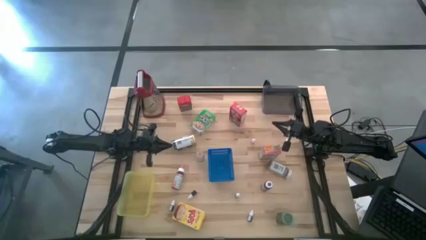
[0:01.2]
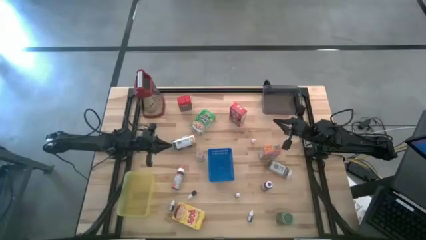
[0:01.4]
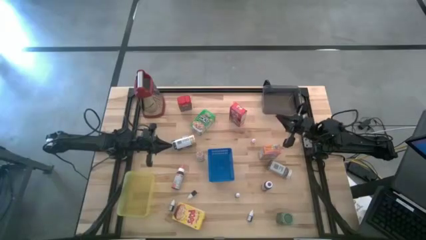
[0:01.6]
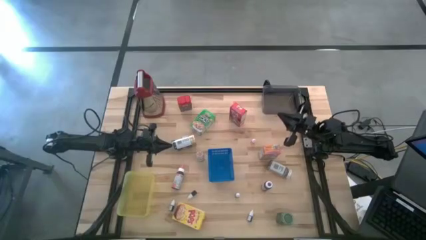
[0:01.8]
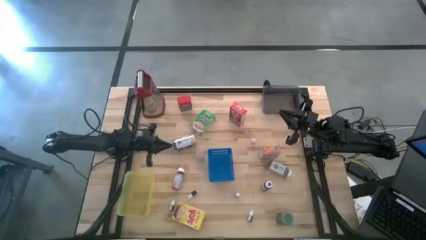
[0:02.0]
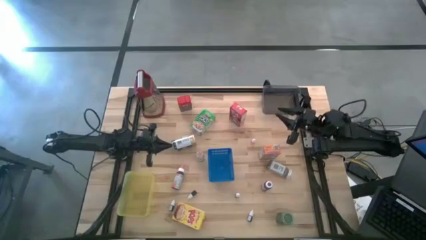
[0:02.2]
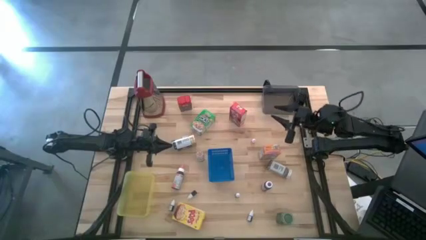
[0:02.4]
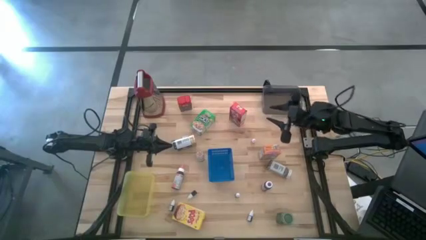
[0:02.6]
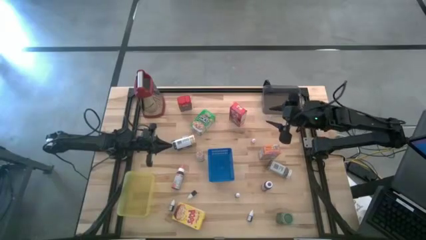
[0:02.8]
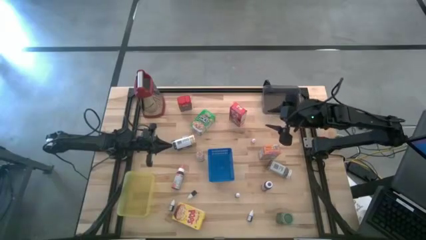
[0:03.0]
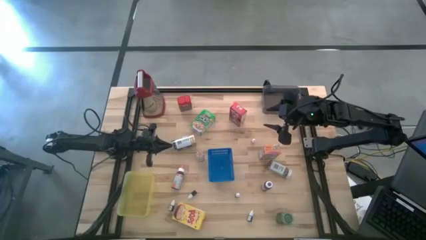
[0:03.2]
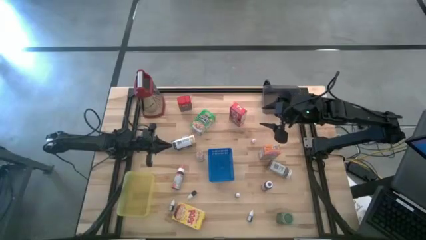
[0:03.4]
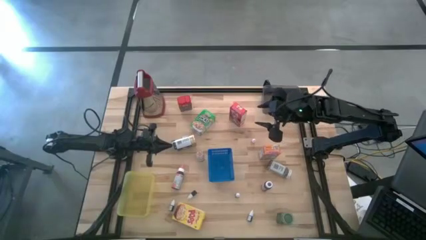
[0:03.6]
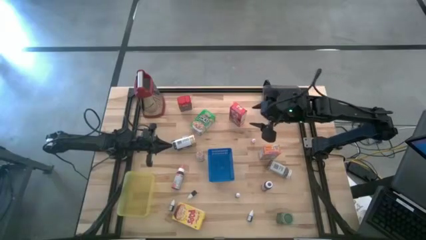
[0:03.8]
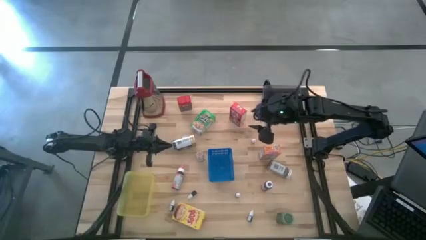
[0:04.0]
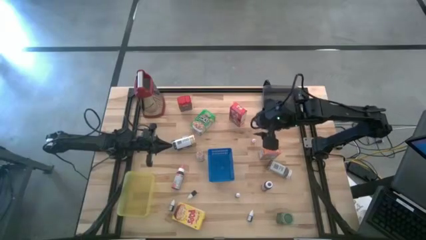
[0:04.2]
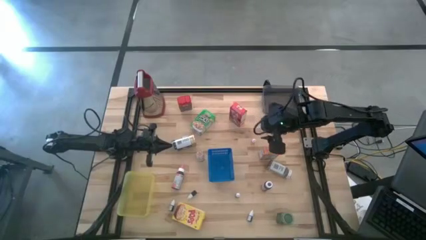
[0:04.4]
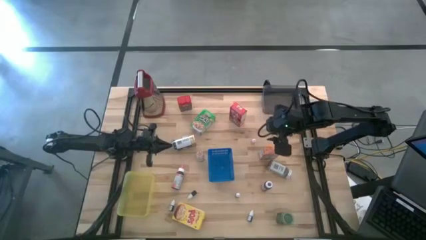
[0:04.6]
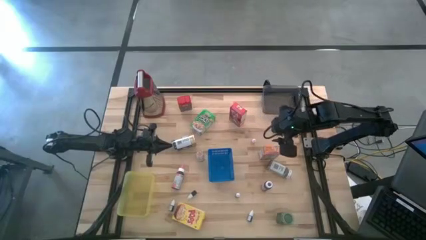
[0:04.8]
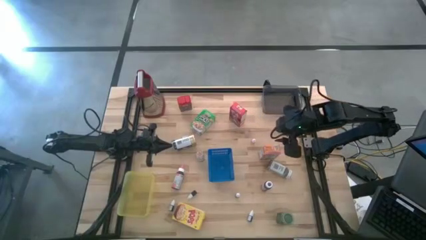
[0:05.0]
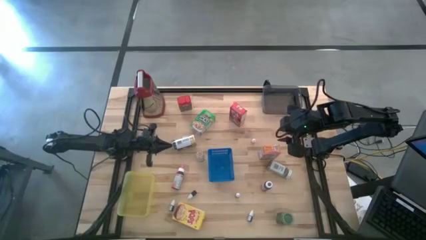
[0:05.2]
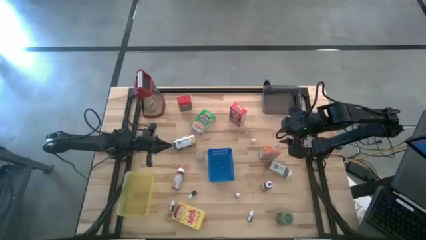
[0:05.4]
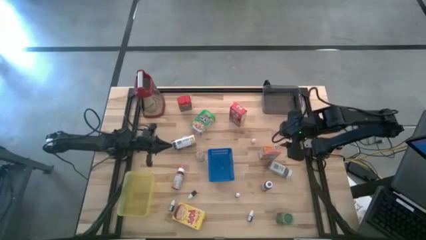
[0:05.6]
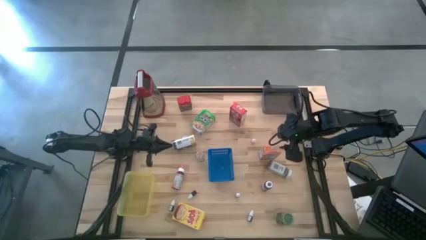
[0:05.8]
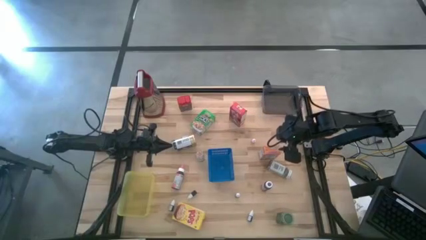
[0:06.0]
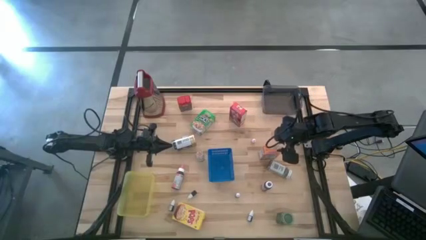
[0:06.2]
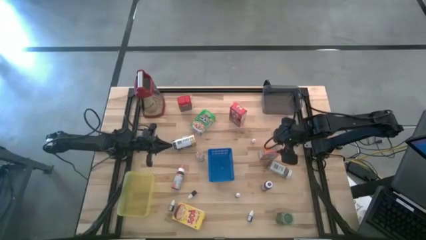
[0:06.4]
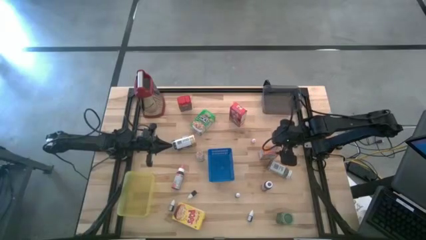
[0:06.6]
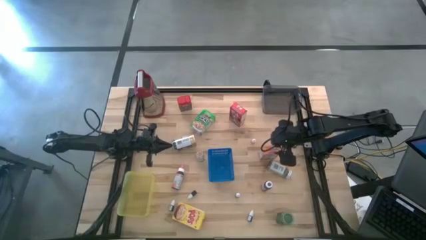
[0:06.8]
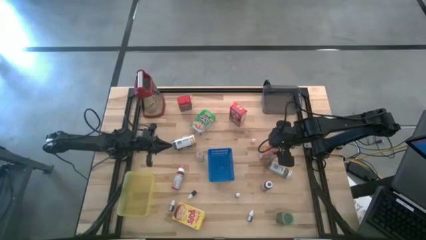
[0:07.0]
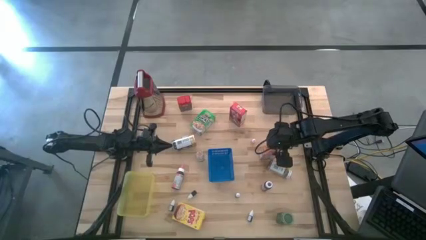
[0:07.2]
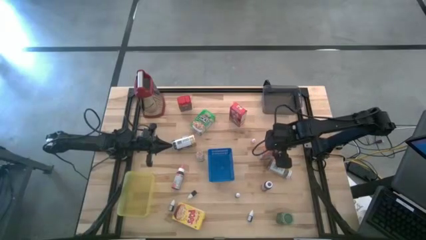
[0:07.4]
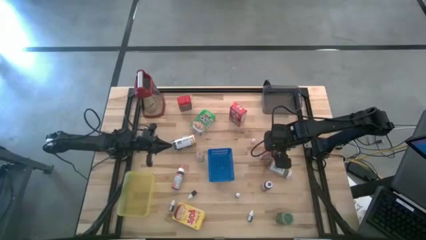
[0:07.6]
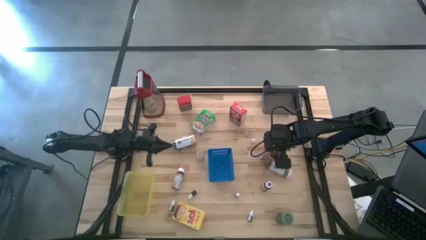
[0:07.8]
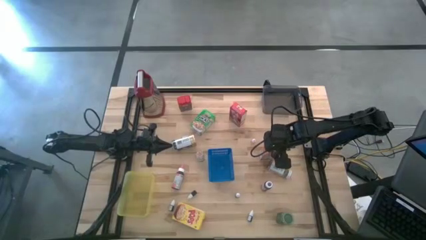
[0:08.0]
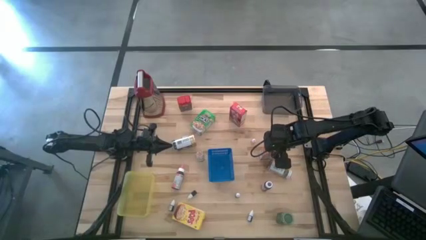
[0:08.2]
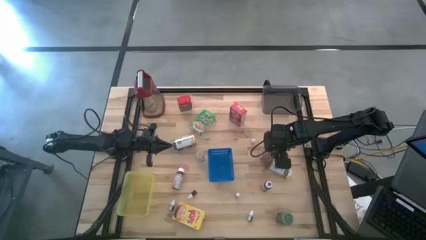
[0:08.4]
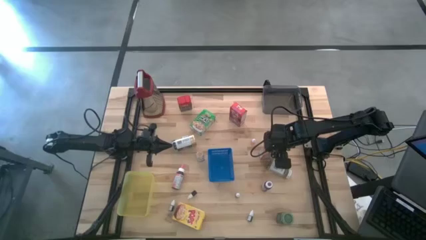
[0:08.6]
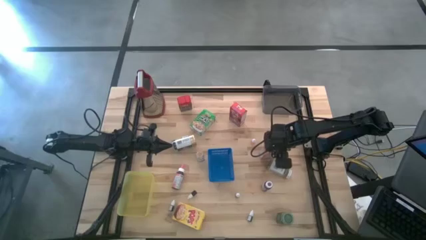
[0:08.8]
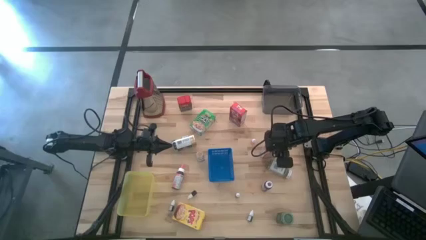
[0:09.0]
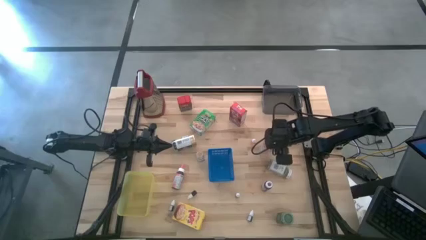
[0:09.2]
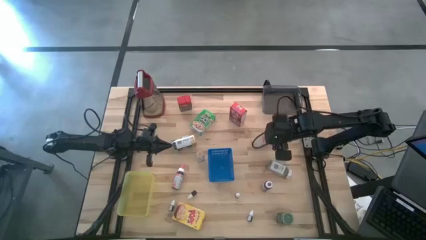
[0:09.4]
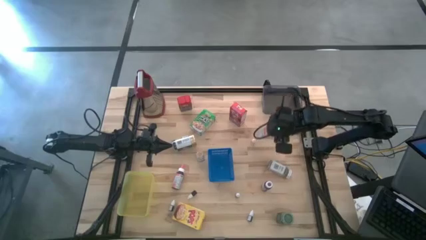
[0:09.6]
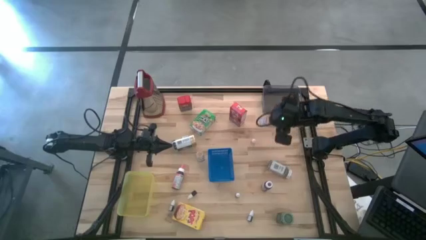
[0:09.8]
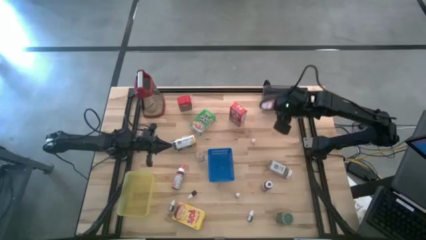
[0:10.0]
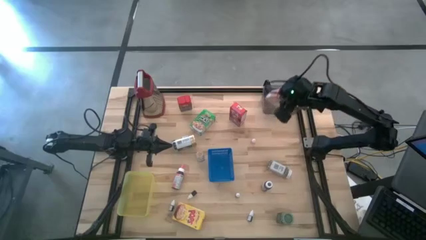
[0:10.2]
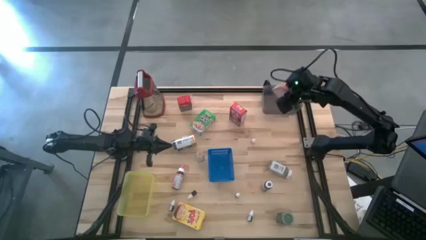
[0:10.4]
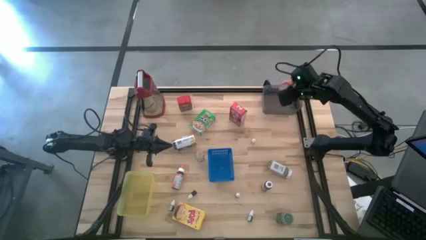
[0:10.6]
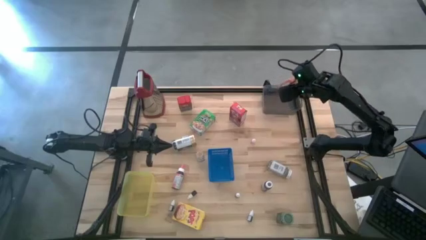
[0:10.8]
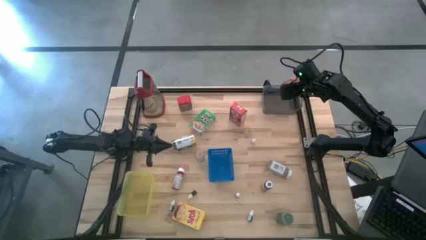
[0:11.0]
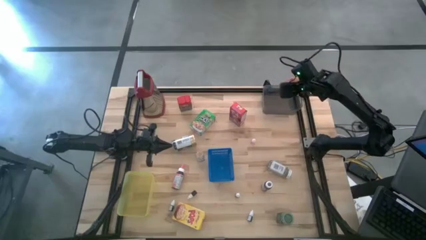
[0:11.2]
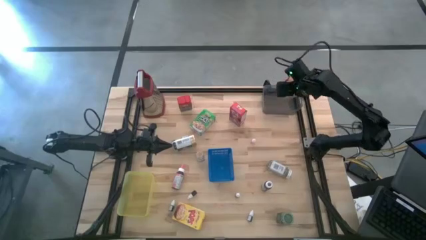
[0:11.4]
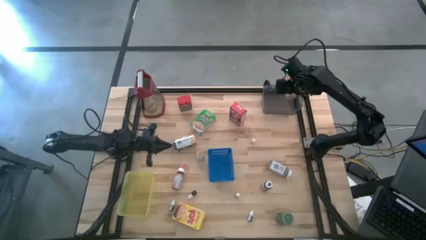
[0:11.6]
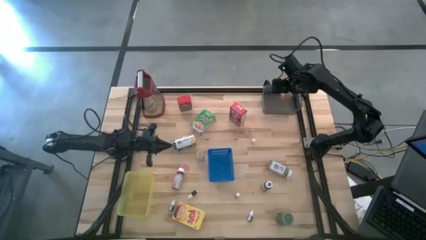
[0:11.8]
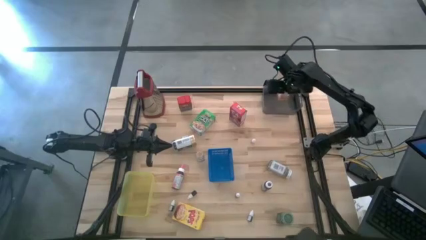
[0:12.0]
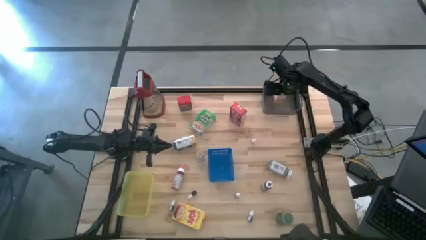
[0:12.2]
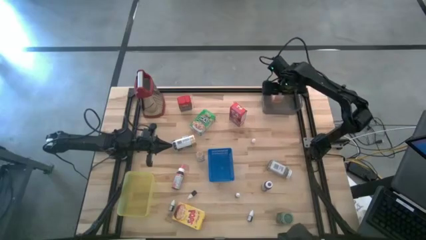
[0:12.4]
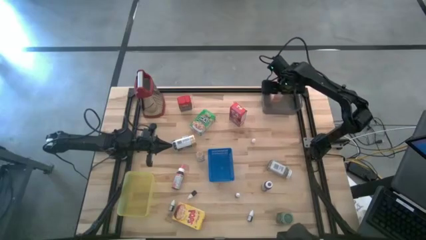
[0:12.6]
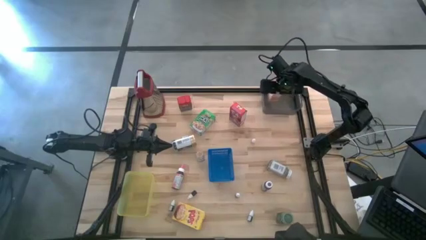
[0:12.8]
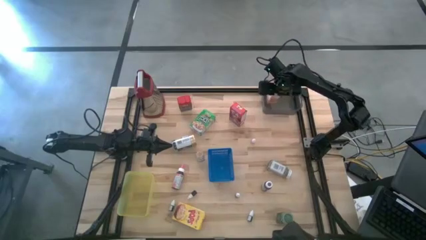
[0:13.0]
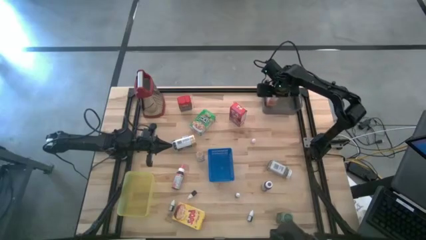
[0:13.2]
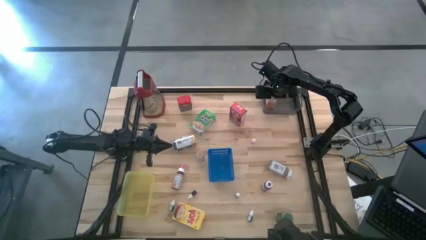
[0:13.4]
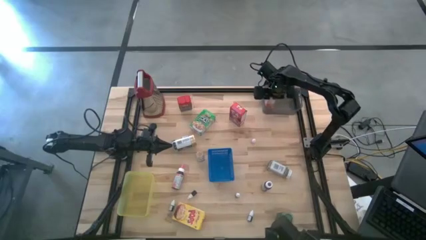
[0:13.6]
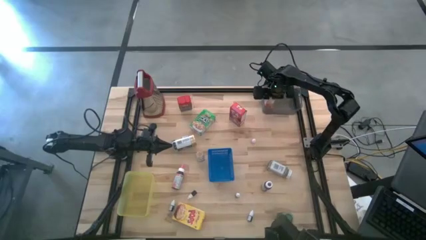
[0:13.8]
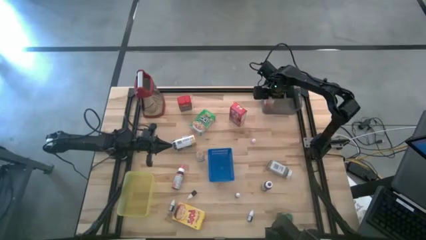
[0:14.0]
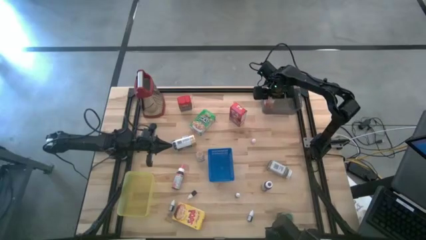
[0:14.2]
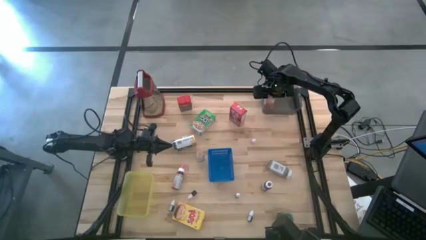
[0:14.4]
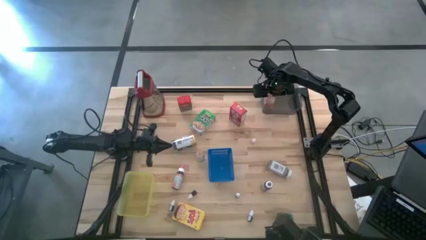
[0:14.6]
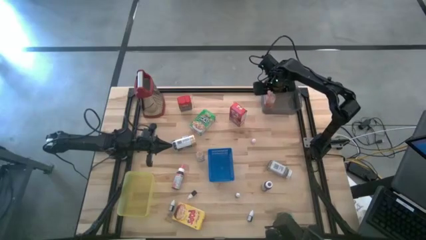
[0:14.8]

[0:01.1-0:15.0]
Task: Pick & Place Kitchen Items
Put the orange cereal box into the black bin
